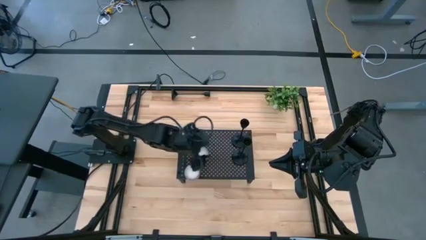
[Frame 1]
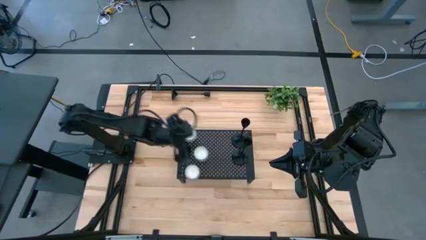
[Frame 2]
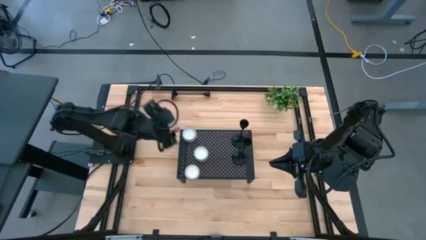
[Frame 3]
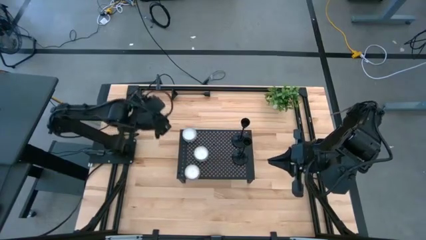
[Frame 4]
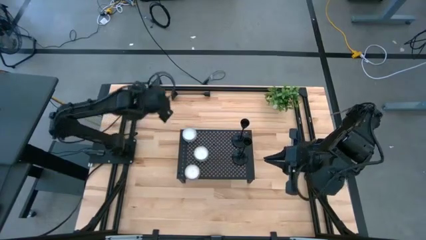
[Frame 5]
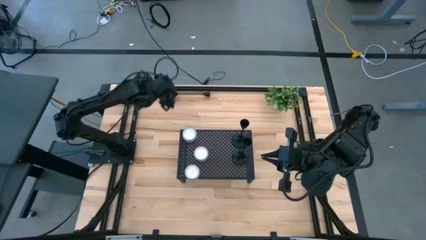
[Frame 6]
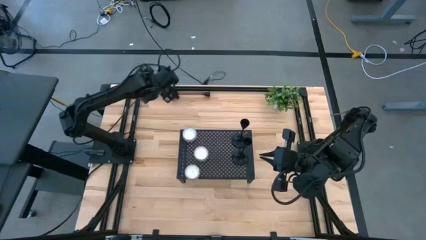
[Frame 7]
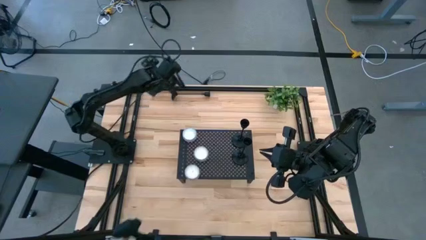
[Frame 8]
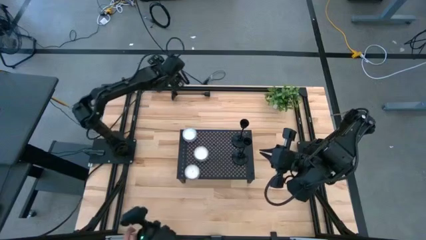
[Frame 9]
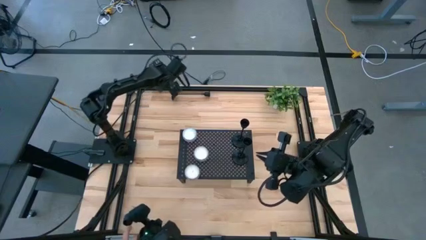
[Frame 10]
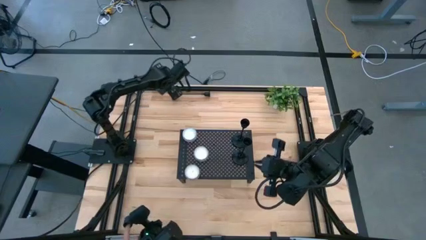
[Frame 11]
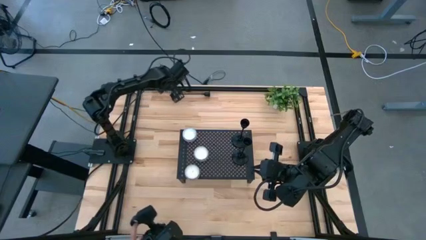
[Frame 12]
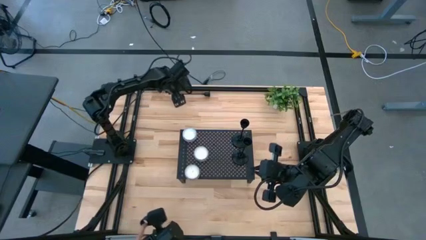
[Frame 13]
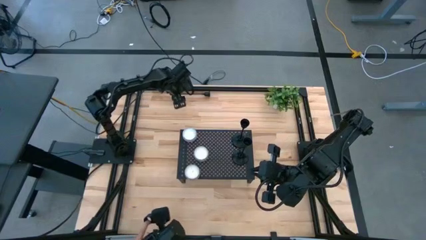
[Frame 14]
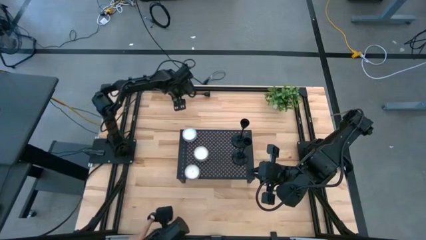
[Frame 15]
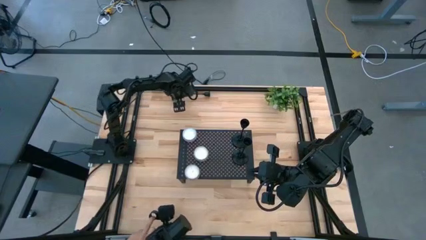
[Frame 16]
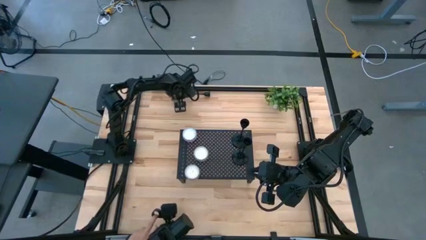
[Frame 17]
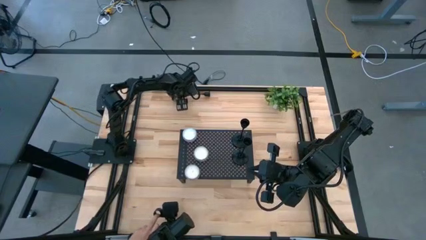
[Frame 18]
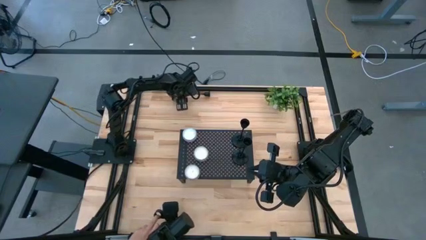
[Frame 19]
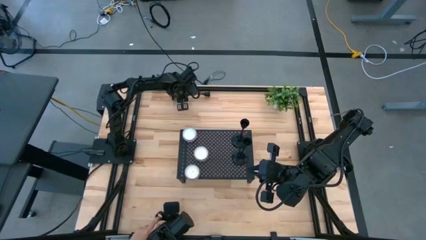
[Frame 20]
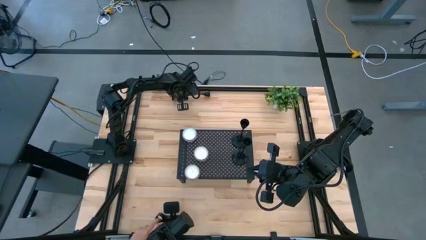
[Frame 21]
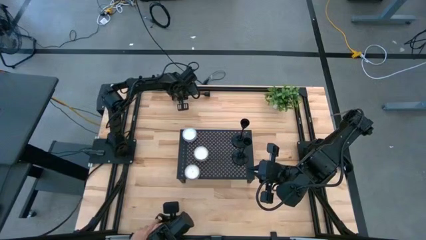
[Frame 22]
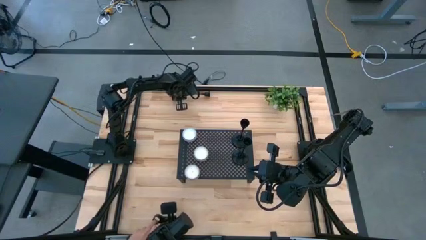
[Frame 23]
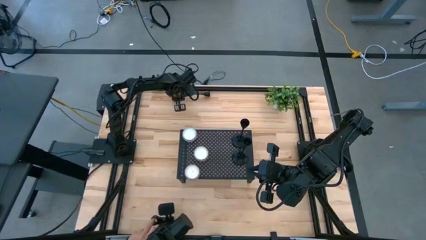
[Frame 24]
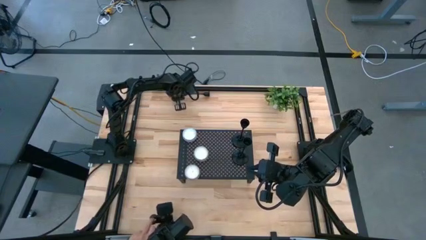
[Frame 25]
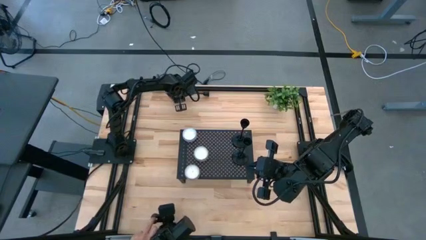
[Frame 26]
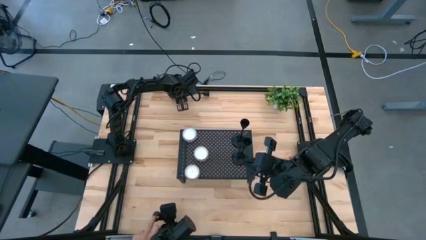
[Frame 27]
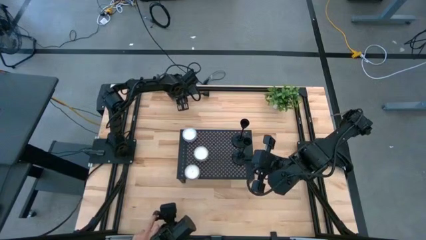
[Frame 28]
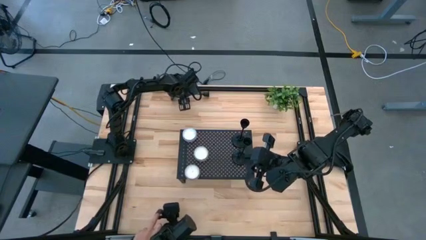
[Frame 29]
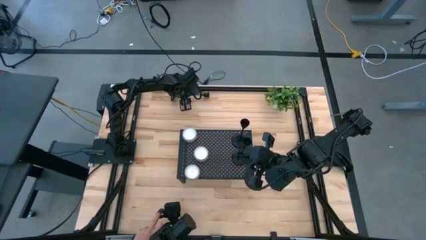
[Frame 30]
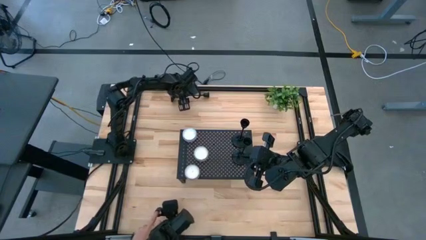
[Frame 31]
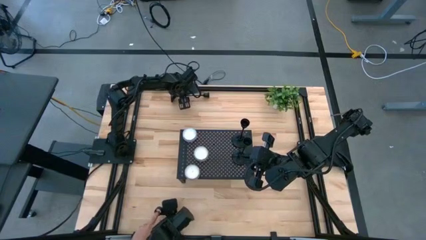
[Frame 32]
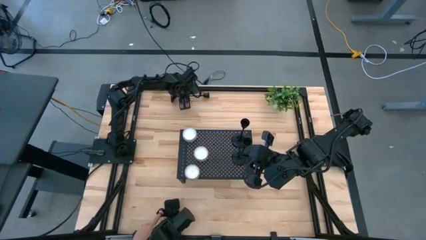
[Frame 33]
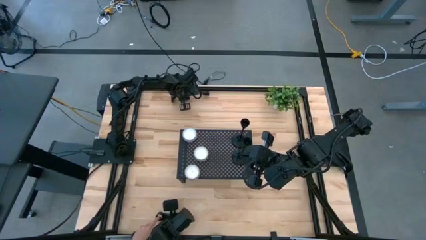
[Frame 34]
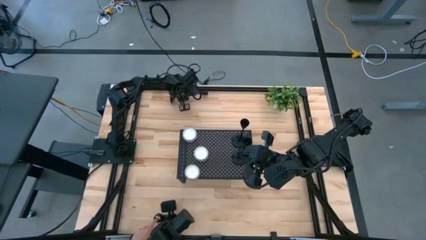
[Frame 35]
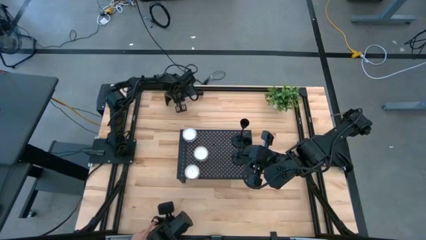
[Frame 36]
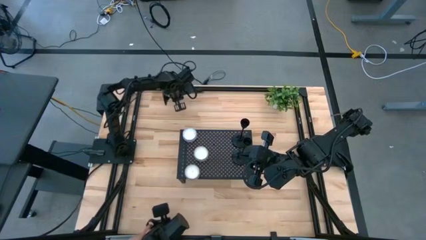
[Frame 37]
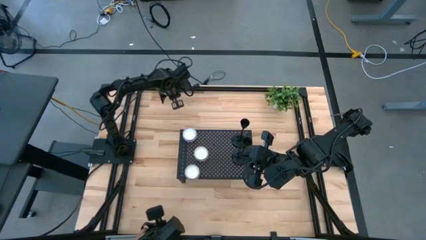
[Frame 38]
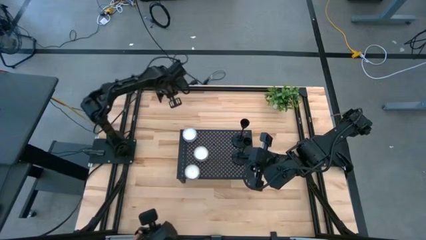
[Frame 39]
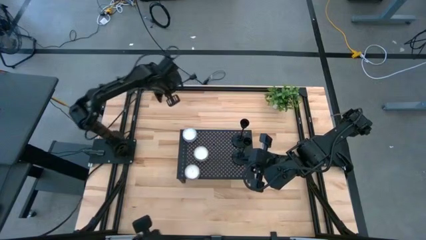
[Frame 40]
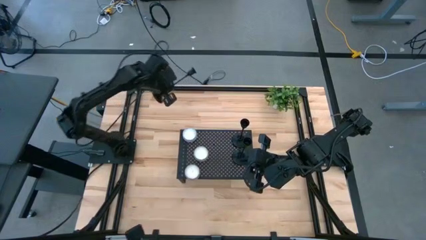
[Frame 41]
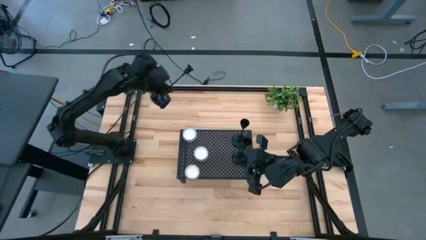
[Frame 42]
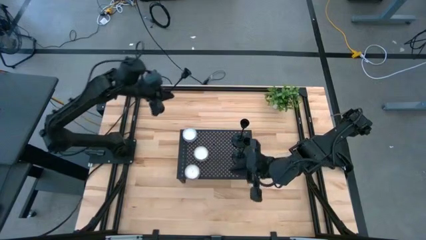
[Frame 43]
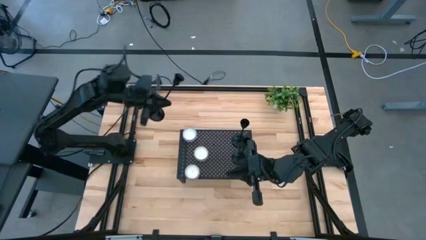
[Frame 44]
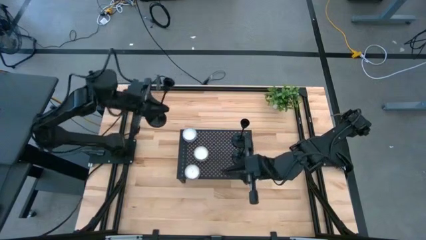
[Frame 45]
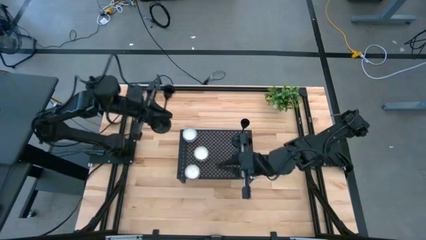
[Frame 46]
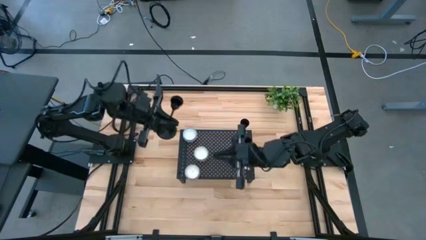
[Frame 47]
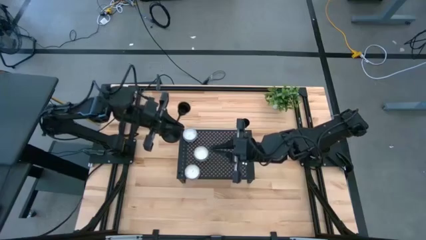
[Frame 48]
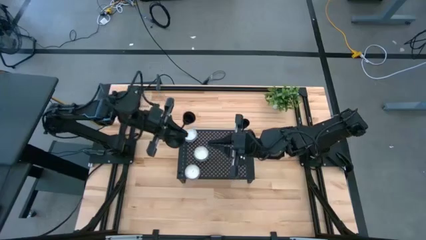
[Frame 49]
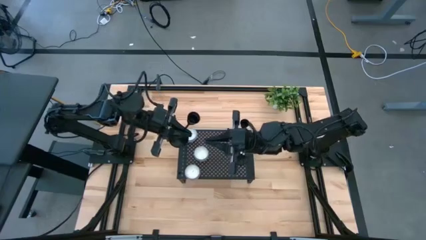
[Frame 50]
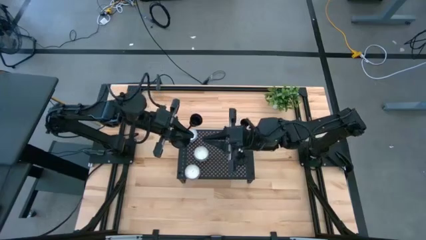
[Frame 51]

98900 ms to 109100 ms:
Task: Pick & Place candle stick holders
Put the black candle holder on the shelf aligned with the other black candle holders

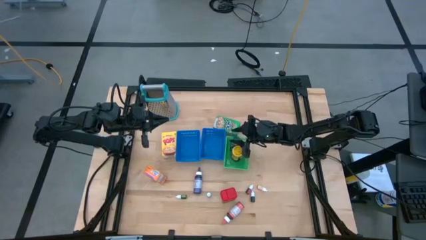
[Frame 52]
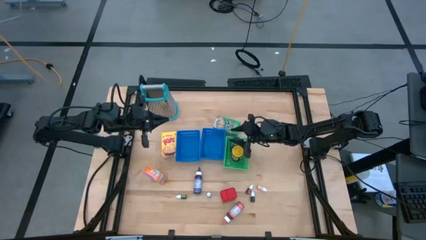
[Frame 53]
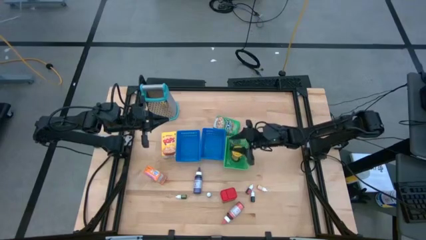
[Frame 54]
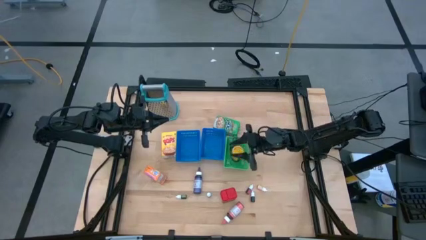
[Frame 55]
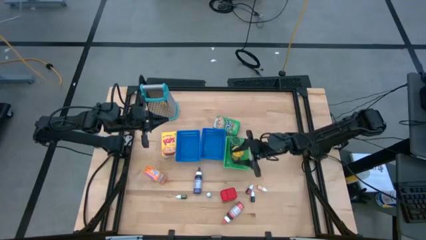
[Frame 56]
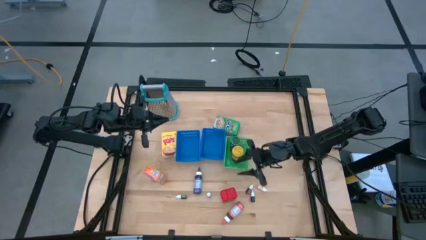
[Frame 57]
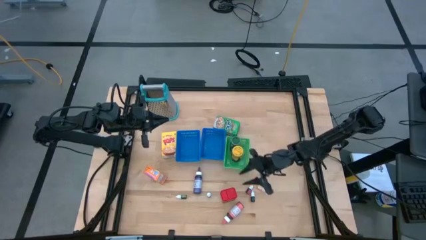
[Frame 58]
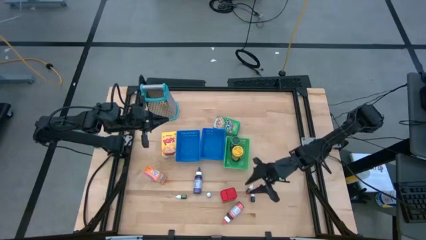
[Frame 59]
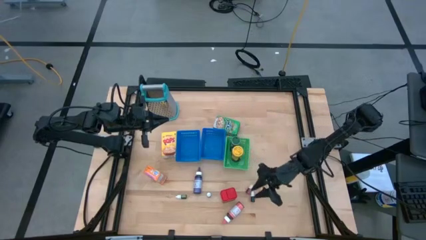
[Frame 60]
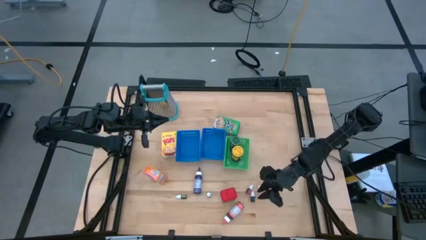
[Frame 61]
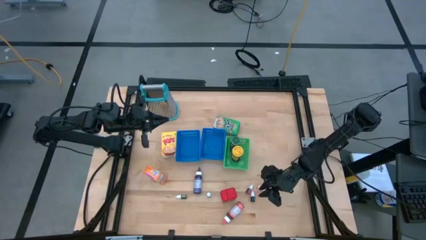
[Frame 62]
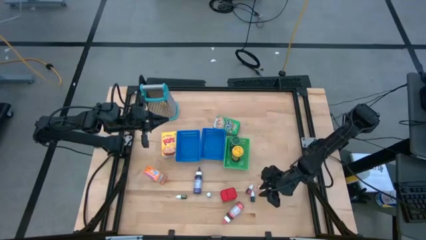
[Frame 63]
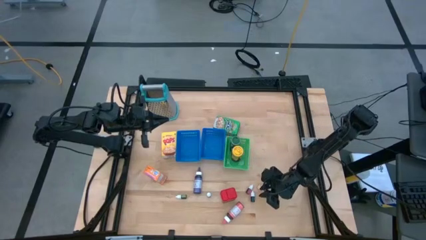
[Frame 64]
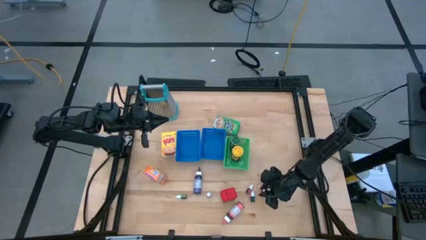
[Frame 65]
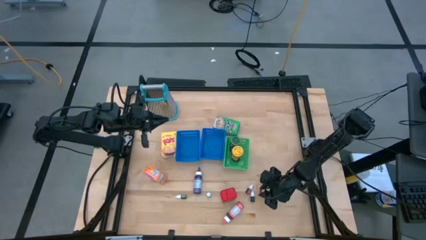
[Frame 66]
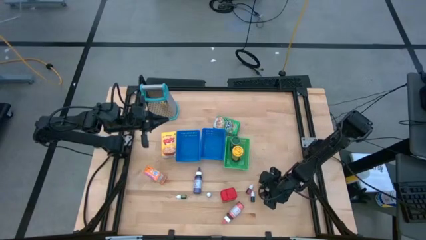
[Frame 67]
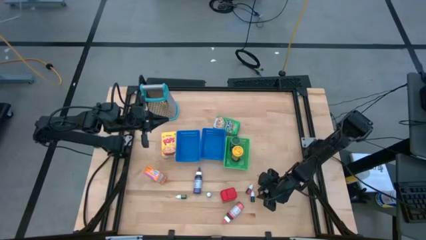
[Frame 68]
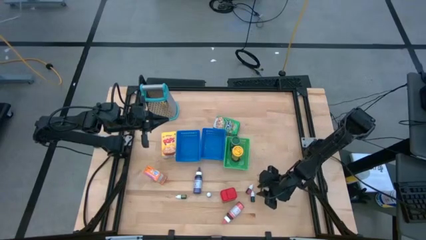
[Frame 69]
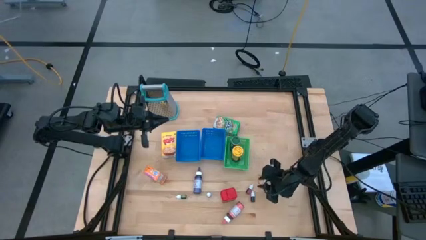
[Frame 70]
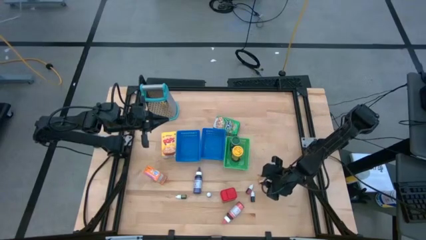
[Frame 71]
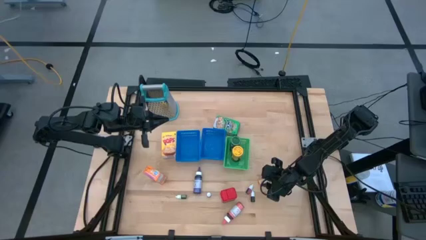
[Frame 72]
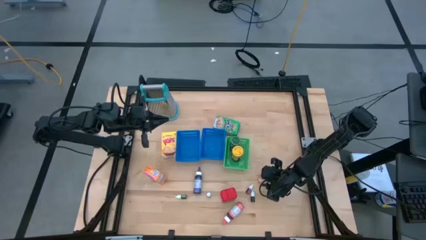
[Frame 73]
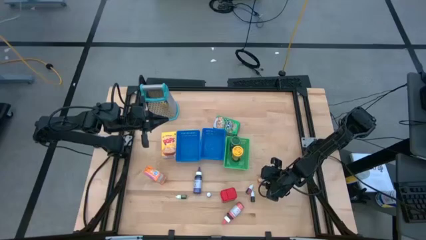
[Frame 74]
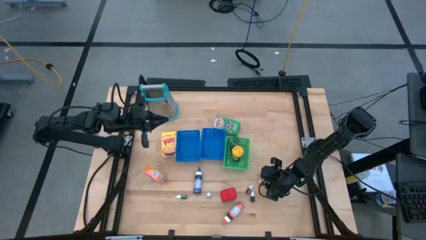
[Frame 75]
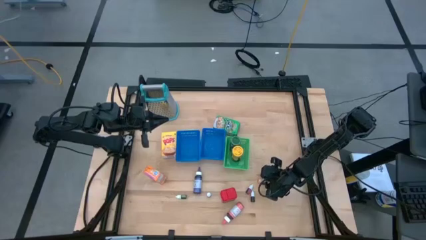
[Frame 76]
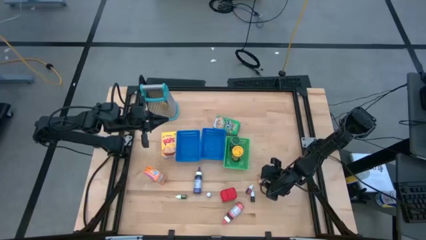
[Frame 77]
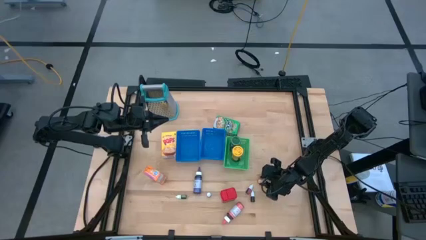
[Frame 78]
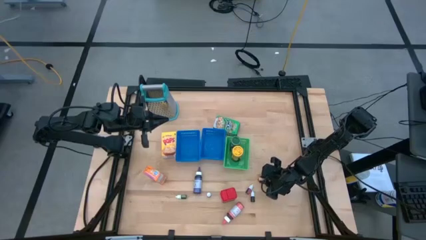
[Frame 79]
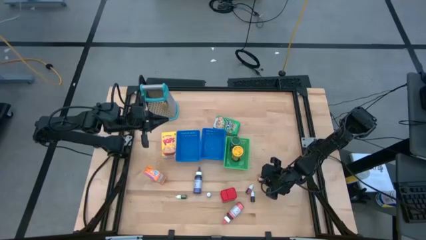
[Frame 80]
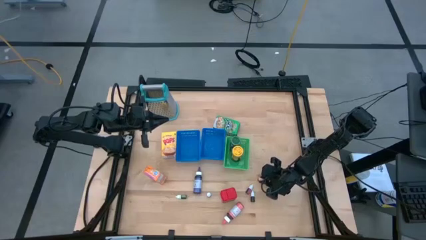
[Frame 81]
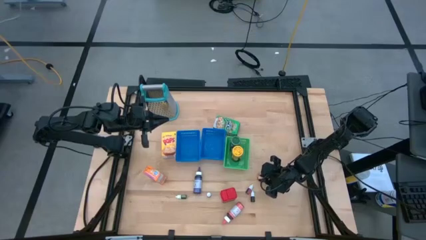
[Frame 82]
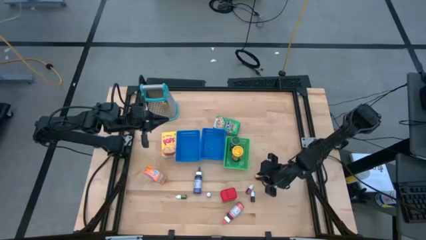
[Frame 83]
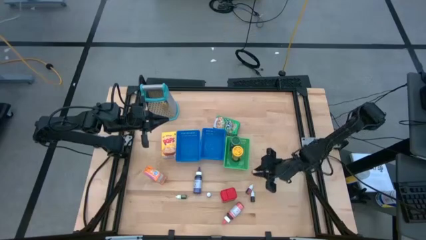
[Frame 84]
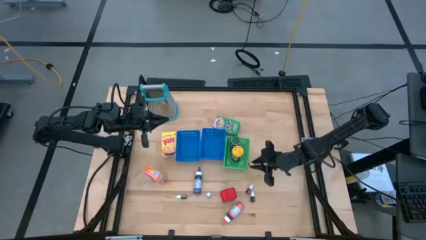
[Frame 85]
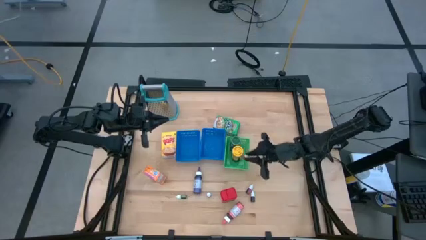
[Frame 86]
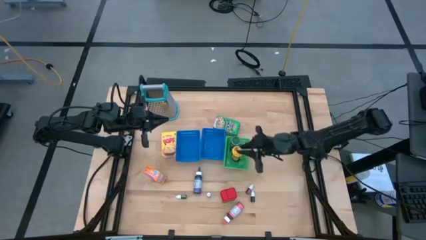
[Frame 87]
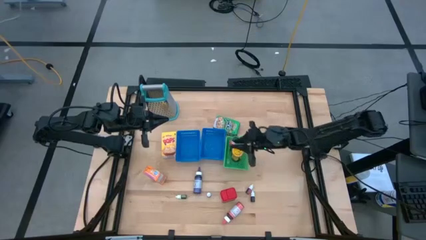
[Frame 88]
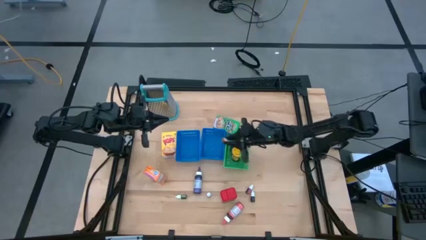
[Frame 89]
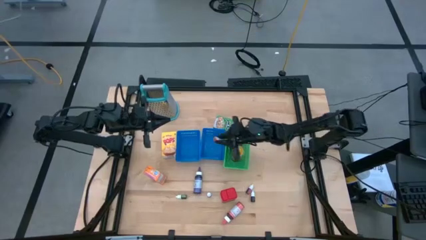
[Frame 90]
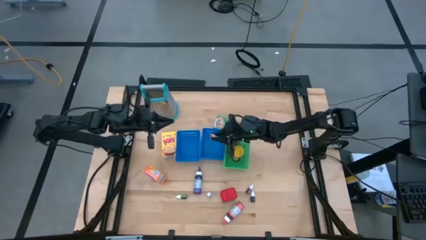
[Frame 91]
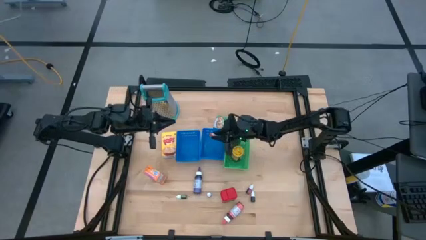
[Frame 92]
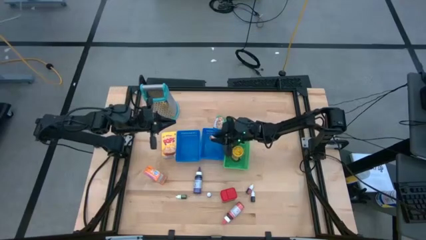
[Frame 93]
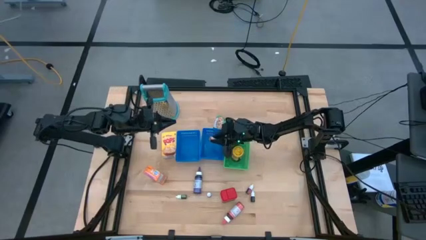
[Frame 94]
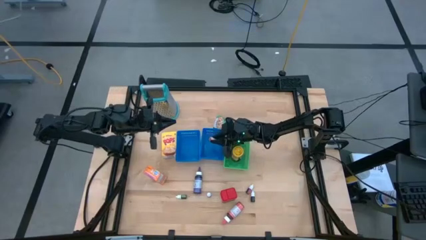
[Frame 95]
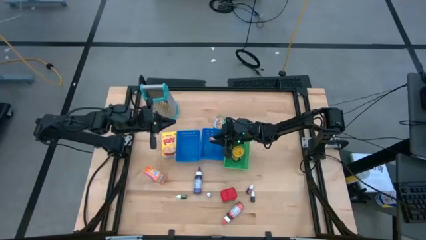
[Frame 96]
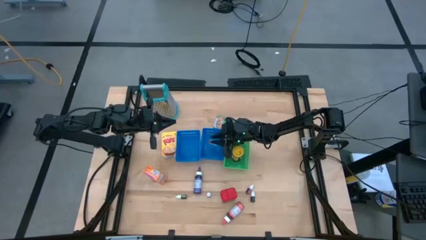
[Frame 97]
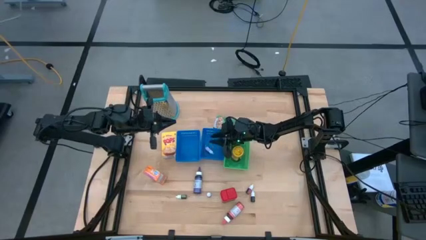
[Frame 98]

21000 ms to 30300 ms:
Task: Pick & Place Kitchen Items
Put the small yellow food coloring bottle into the right blue bin
